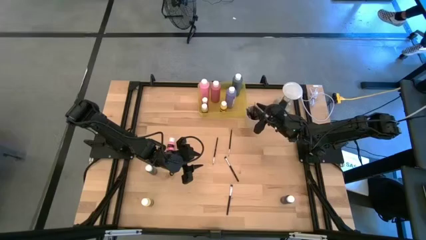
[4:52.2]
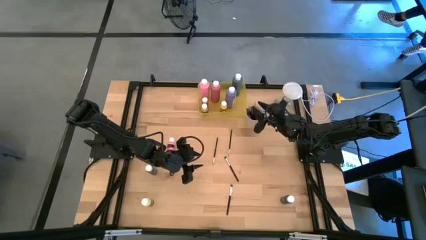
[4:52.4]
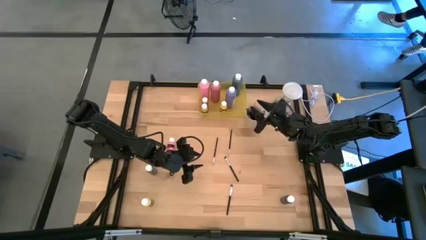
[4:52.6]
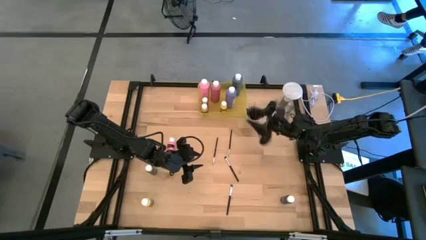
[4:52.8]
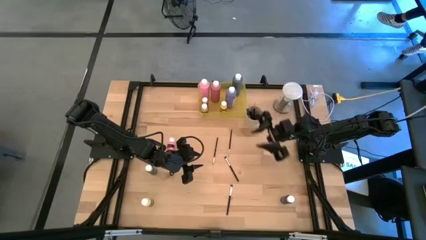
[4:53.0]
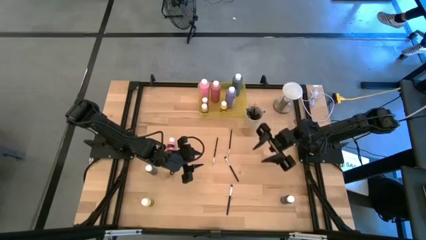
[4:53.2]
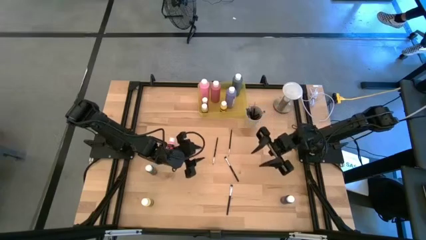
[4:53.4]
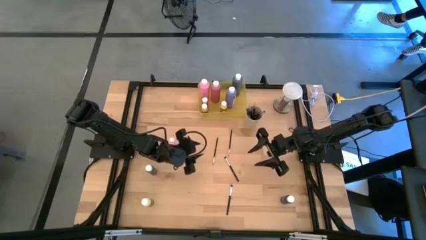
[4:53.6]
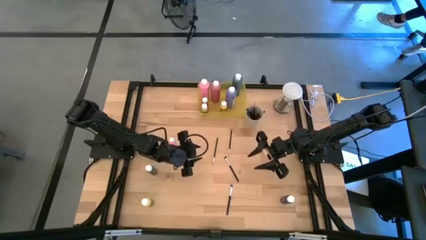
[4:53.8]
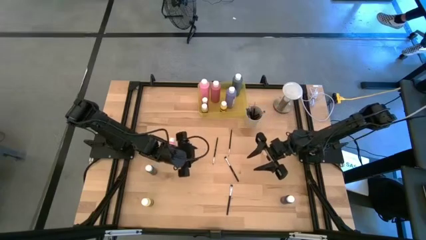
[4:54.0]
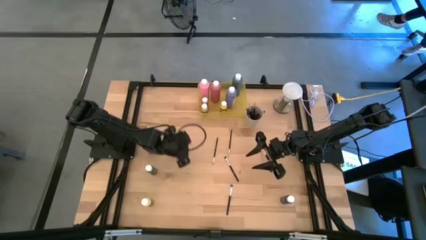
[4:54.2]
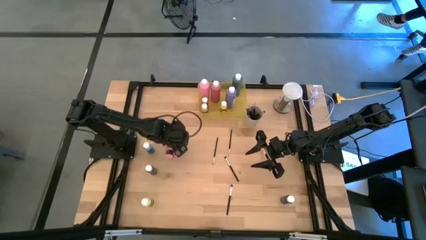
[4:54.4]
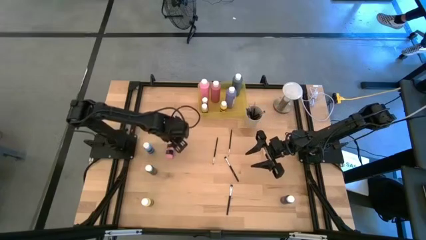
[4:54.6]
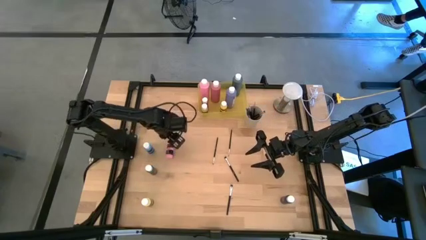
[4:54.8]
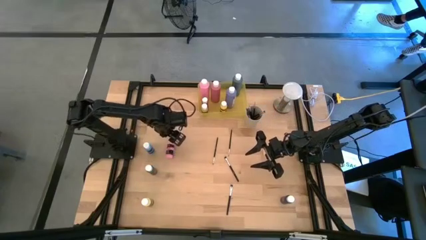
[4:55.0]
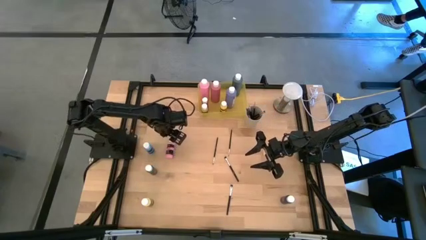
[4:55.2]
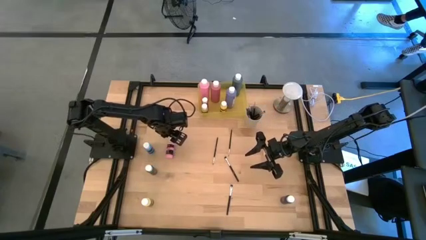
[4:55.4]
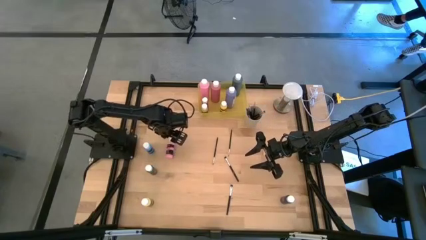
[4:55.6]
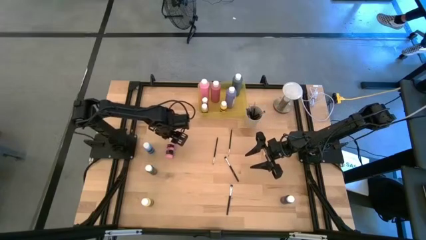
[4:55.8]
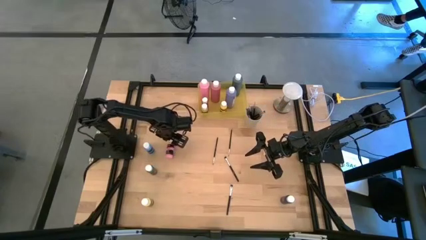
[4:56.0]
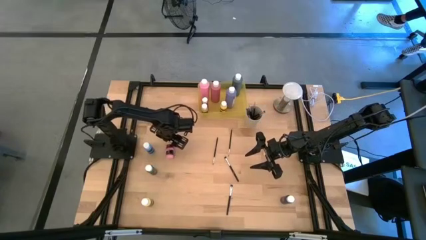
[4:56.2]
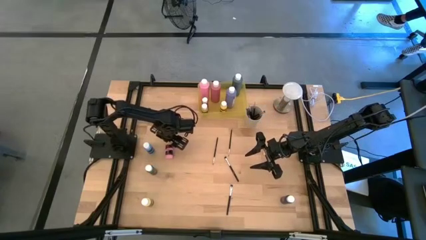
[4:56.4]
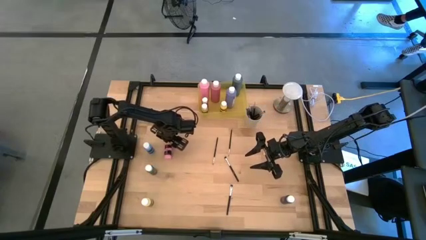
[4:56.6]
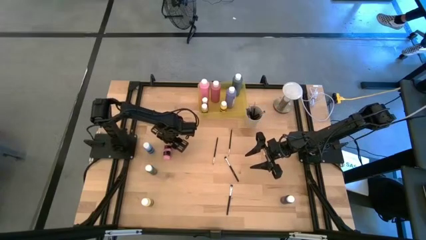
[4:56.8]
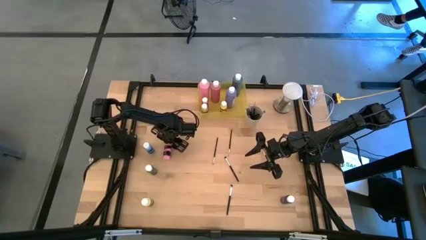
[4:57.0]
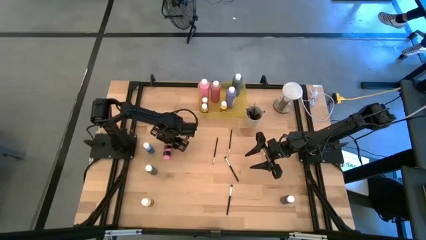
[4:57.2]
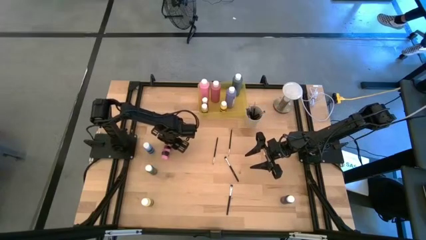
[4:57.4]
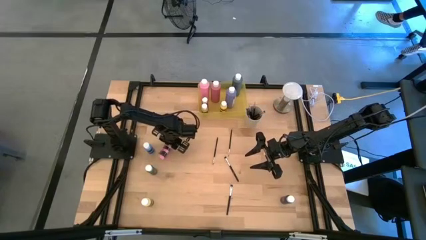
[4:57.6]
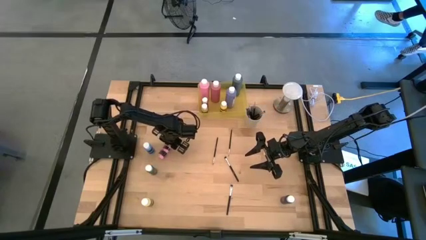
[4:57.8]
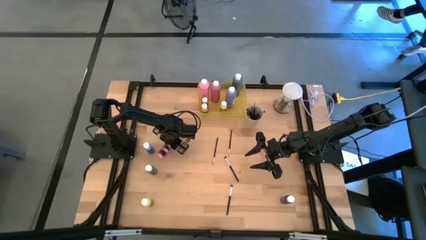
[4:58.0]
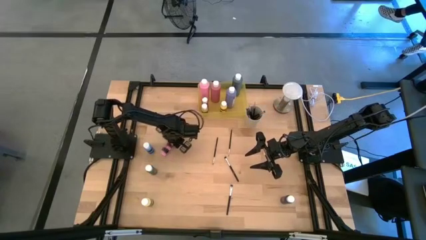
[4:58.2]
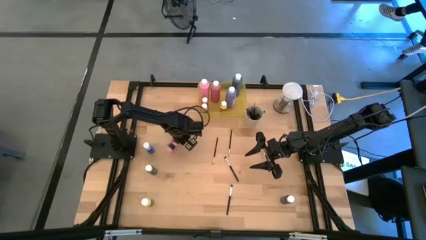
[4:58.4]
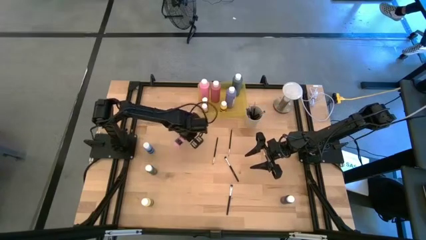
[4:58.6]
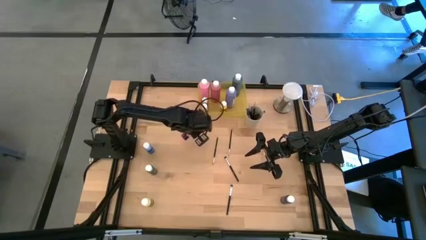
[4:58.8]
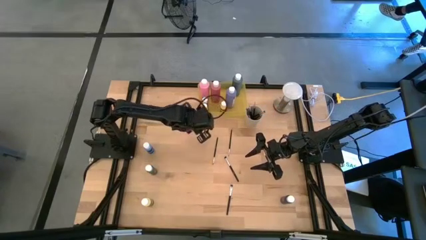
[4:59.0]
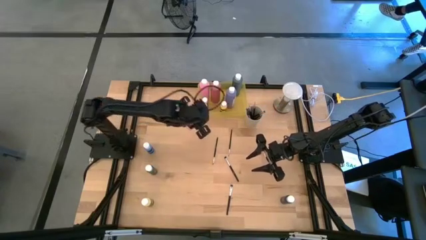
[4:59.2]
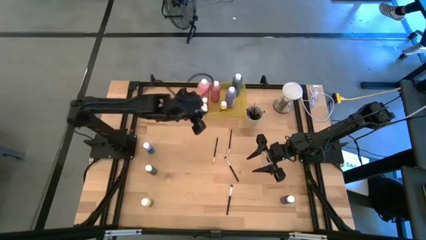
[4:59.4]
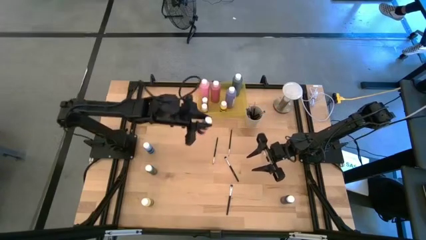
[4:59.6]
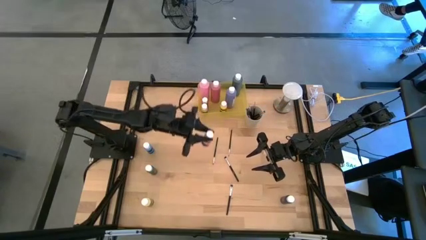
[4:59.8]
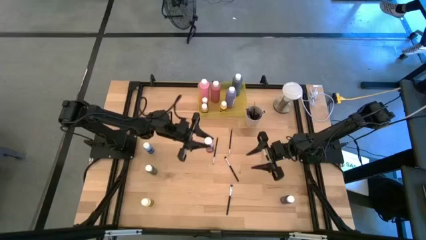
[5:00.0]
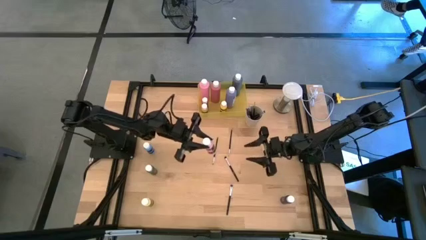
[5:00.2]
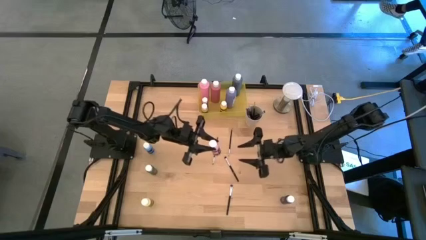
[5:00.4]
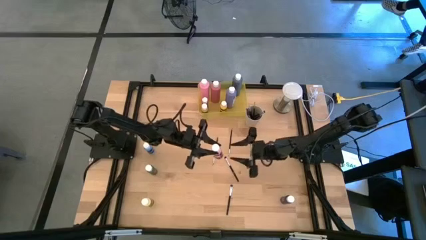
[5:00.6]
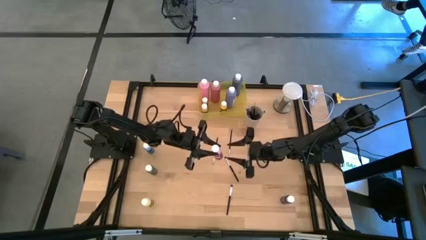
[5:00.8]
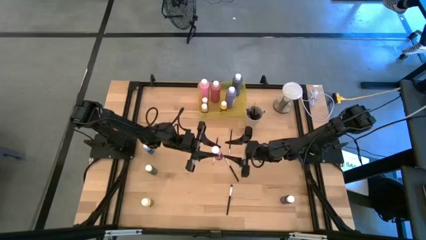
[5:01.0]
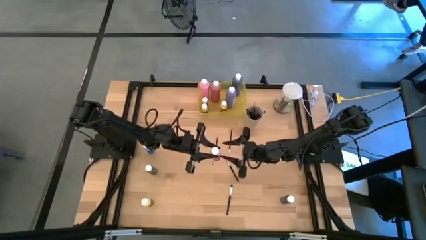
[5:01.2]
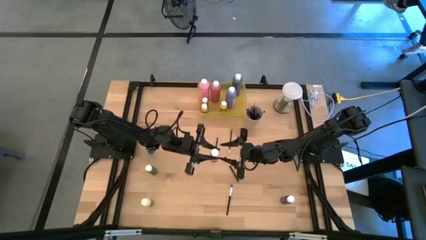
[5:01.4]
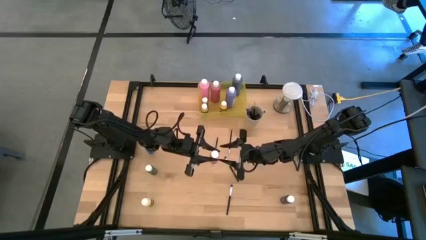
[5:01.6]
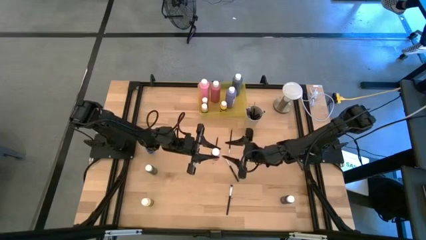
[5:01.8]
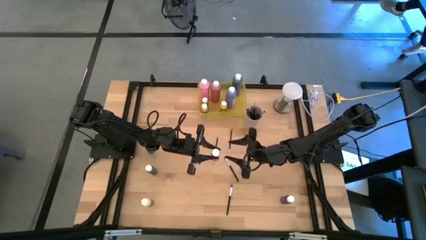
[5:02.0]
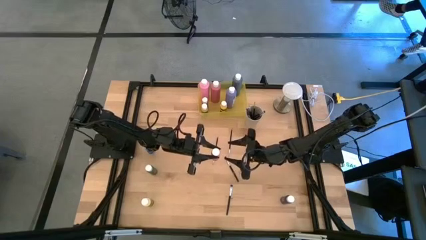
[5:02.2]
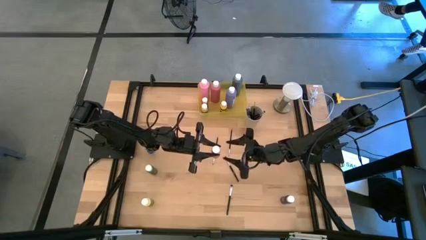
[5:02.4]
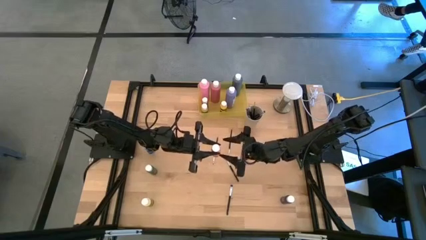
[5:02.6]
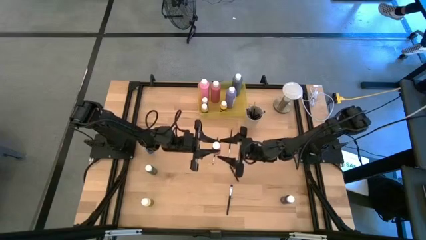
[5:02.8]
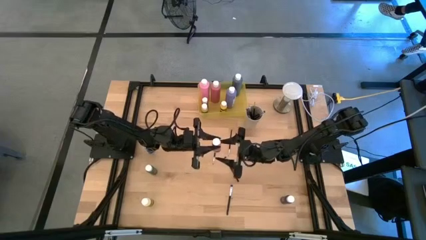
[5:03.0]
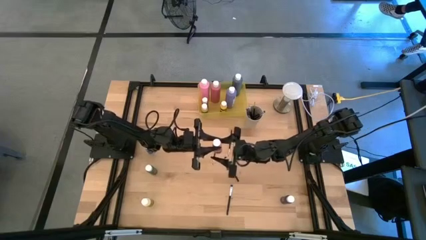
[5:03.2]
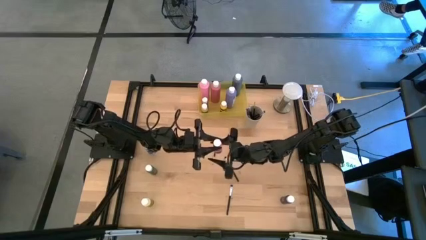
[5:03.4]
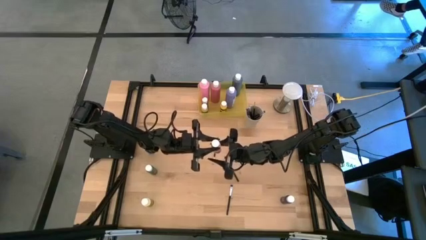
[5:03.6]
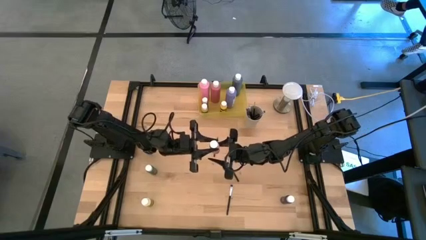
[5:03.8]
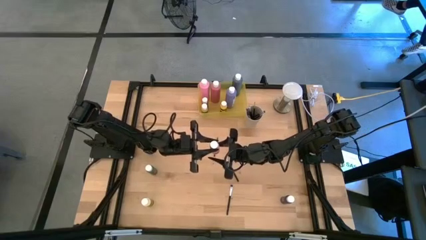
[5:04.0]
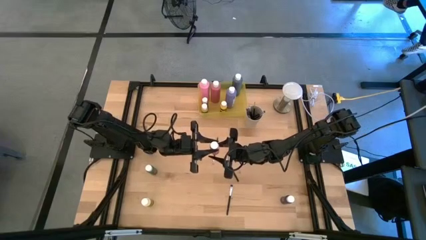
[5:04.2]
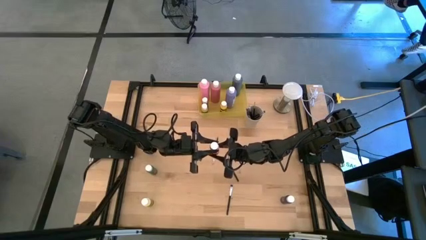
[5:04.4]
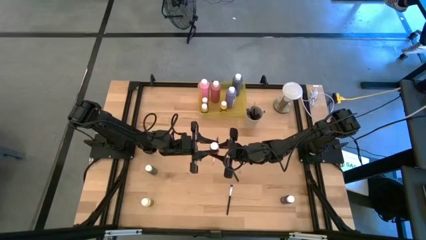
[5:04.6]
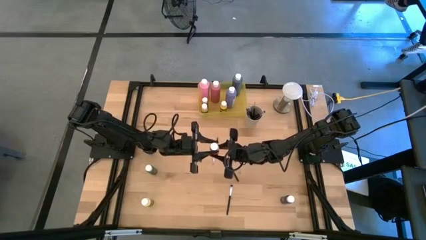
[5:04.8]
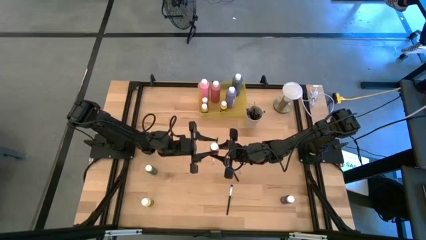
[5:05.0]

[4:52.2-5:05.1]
Task: Pick & Place Paint Supplies
Put the small pink paint bottle into the yellow bin

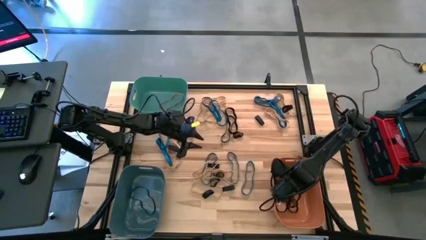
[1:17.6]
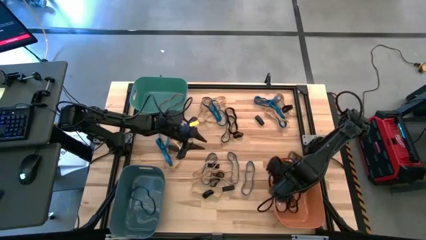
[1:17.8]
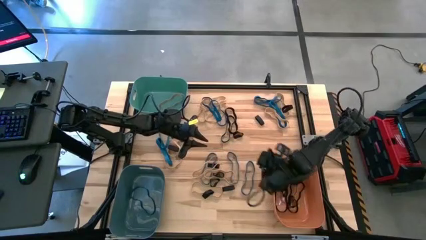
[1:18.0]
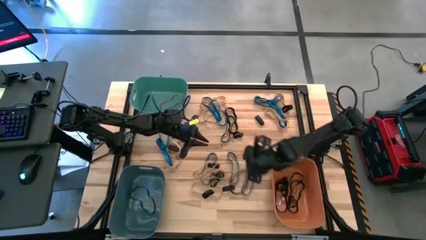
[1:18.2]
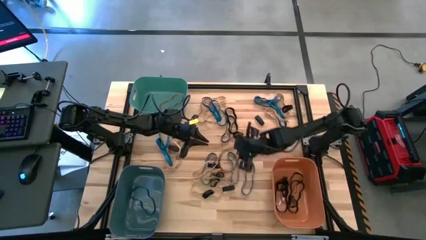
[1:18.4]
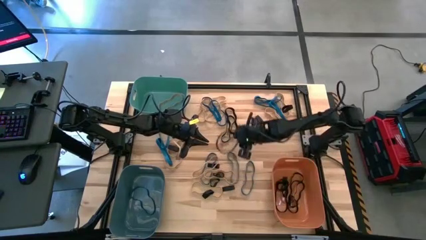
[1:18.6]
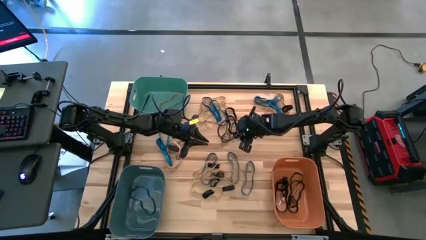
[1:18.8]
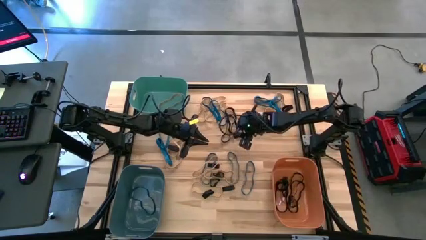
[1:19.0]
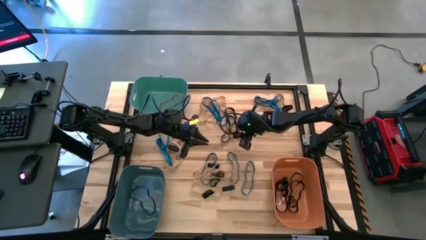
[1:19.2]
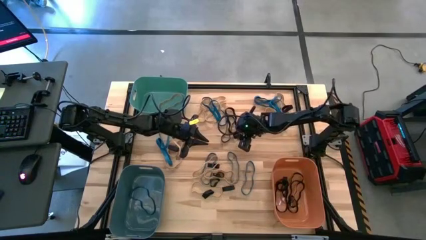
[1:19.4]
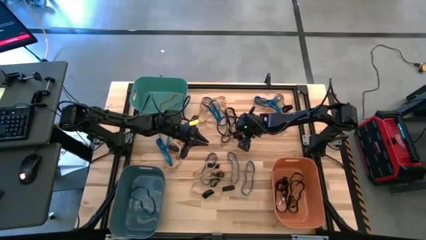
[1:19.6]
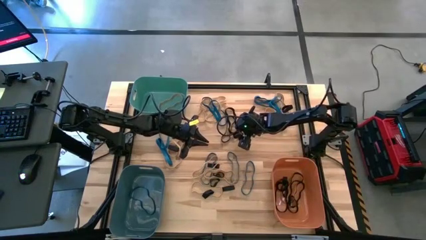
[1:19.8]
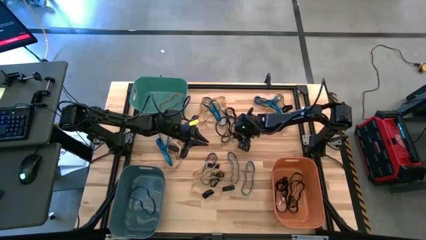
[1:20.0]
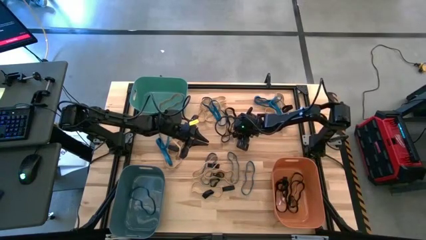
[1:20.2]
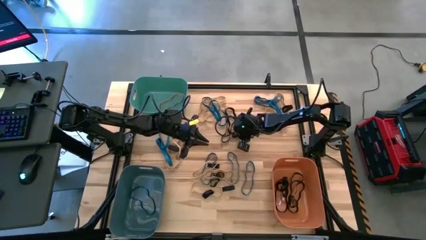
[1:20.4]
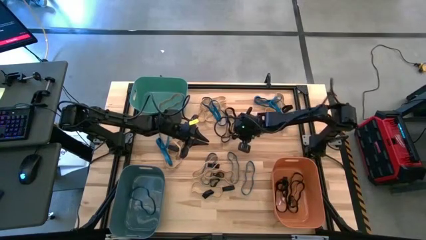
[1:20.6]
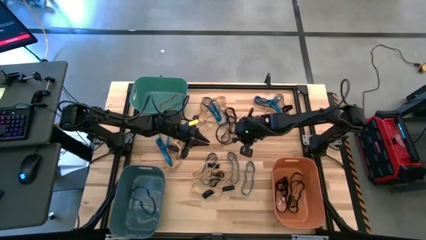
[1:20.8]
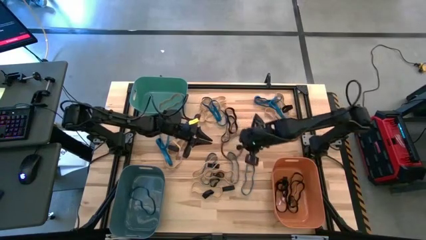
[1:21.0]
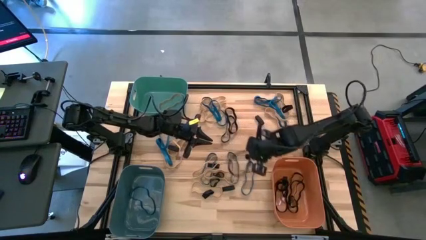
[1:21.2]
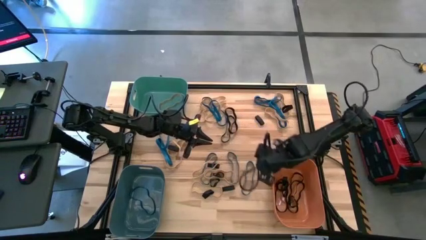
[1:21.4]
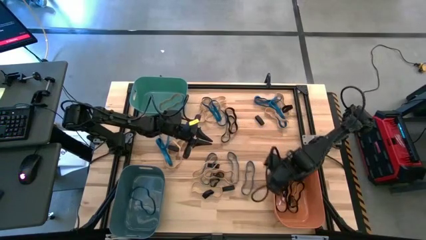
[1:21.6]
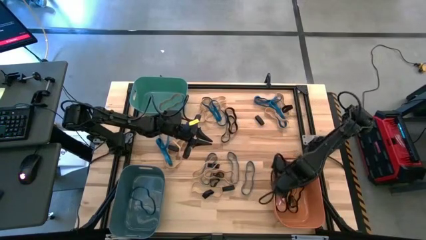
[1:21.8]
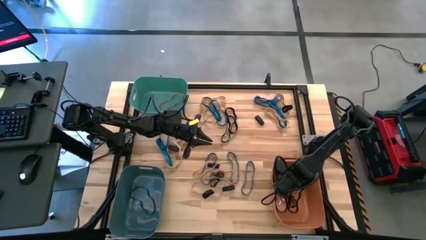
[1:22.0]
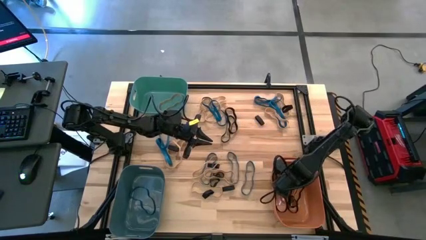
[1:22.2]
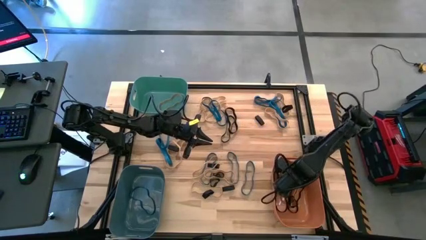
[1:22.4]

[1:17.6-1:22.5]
Task: Sort rubber bands into baskets
Put the black rubber band into the orange bin
